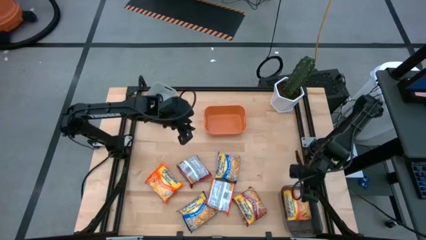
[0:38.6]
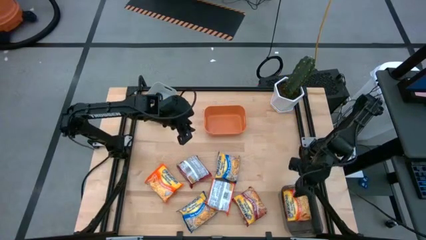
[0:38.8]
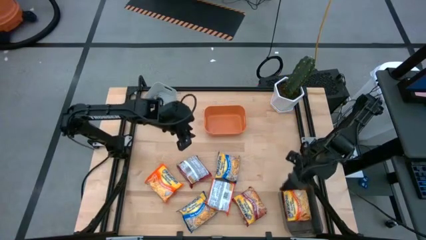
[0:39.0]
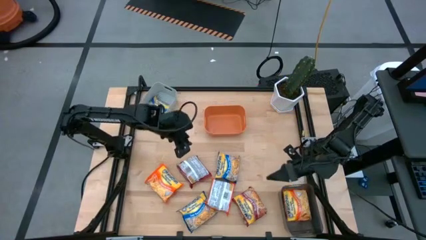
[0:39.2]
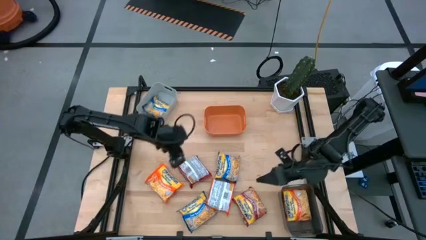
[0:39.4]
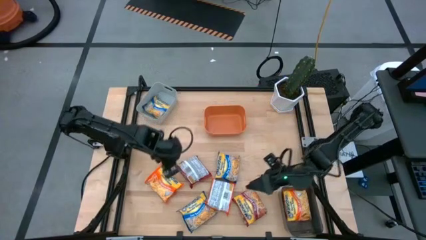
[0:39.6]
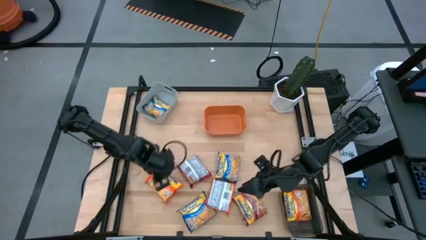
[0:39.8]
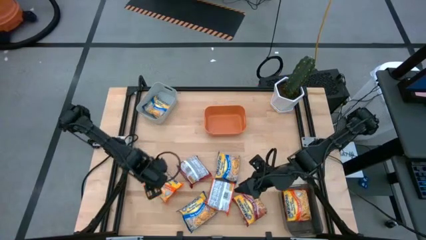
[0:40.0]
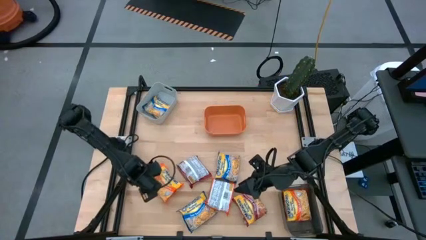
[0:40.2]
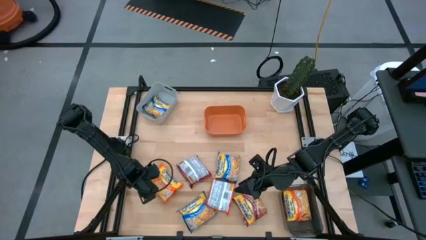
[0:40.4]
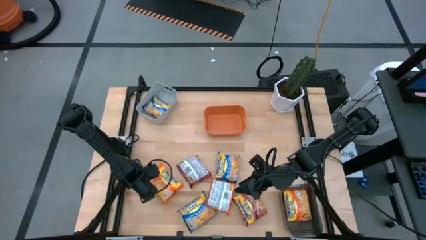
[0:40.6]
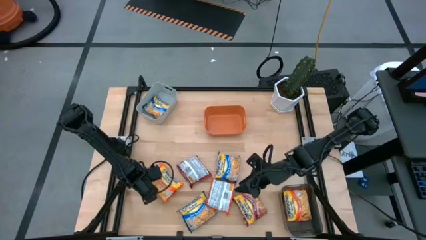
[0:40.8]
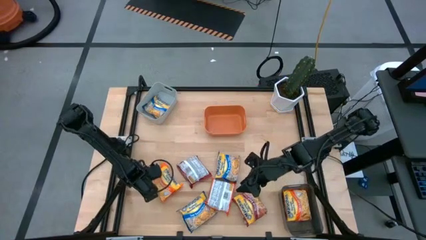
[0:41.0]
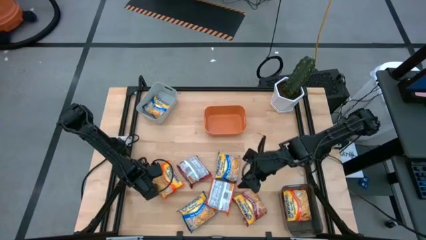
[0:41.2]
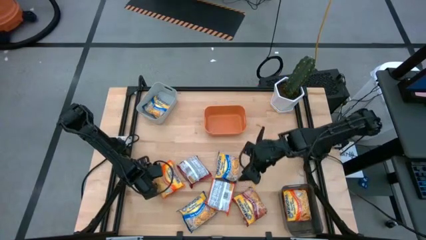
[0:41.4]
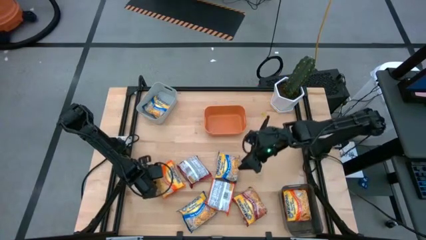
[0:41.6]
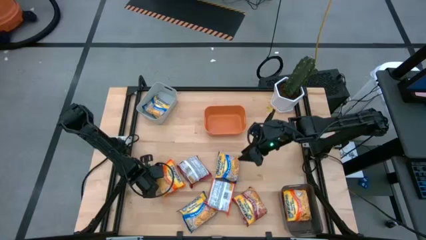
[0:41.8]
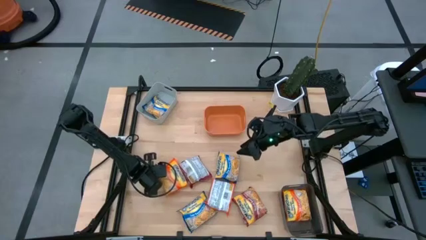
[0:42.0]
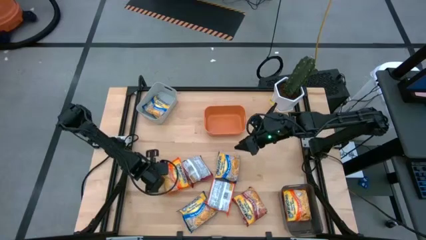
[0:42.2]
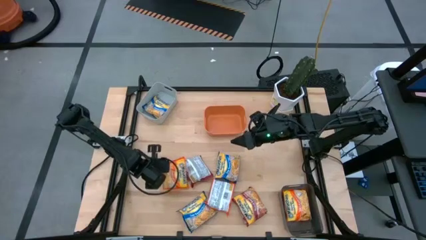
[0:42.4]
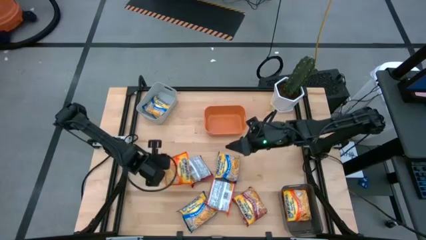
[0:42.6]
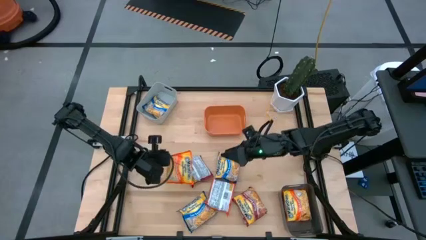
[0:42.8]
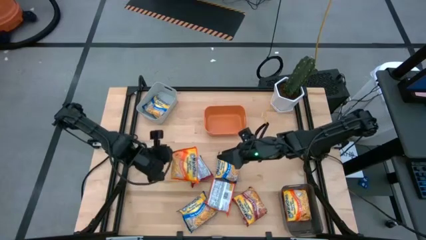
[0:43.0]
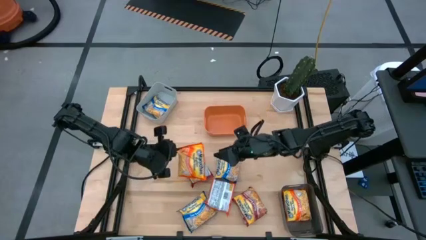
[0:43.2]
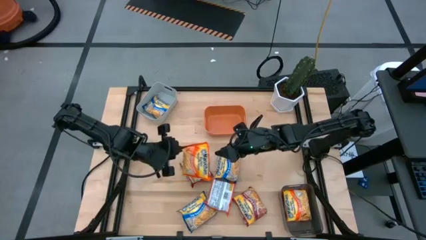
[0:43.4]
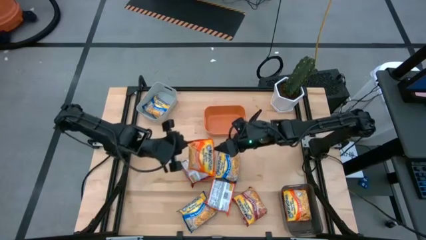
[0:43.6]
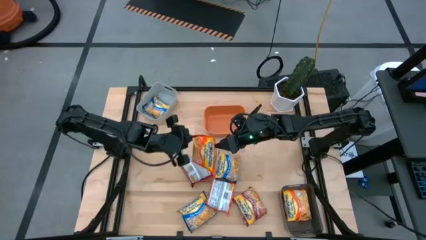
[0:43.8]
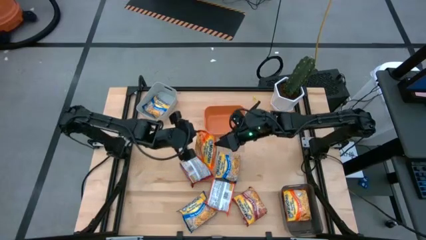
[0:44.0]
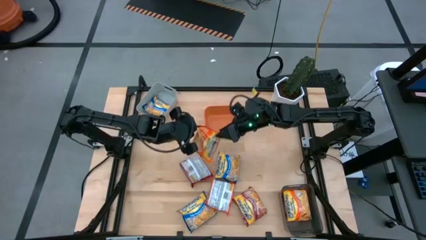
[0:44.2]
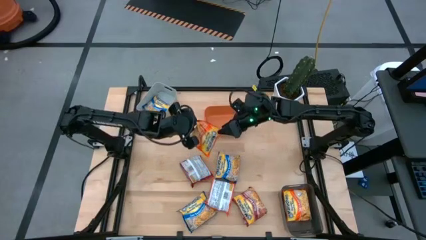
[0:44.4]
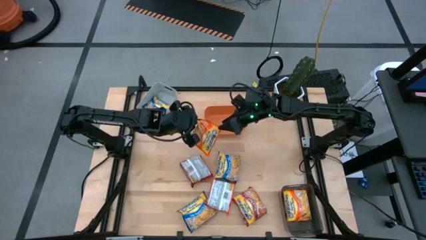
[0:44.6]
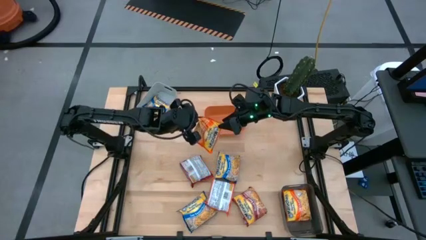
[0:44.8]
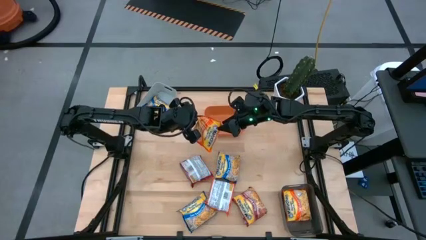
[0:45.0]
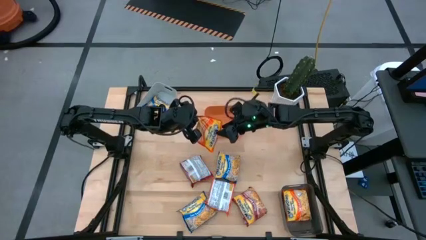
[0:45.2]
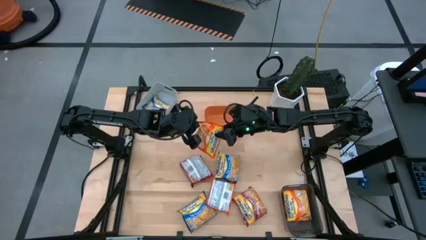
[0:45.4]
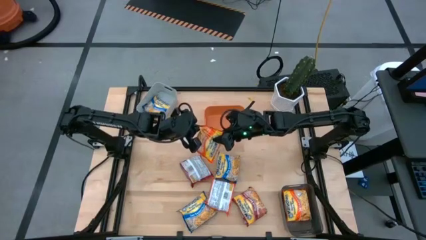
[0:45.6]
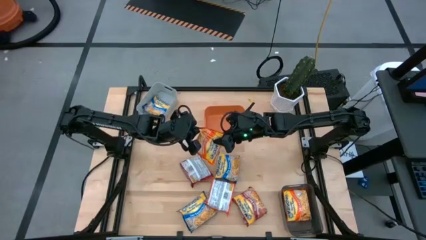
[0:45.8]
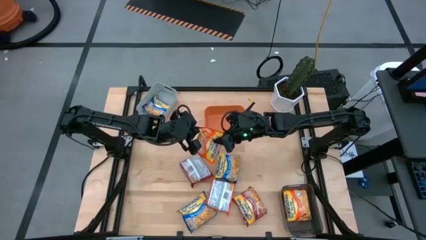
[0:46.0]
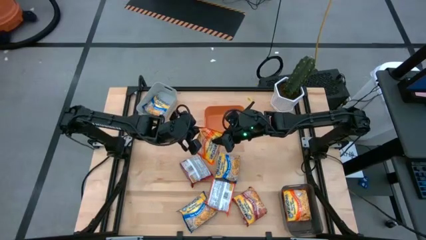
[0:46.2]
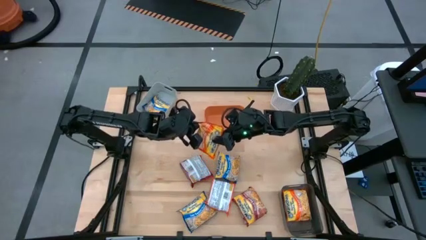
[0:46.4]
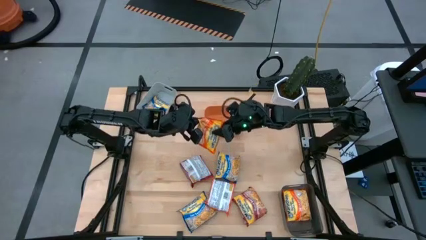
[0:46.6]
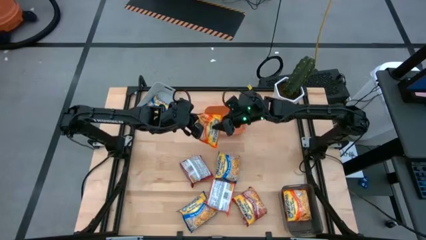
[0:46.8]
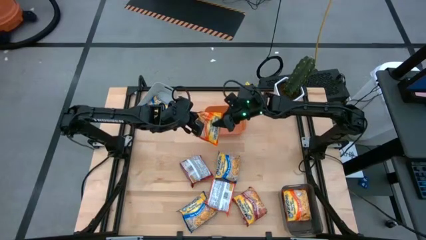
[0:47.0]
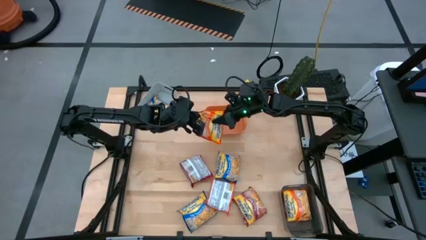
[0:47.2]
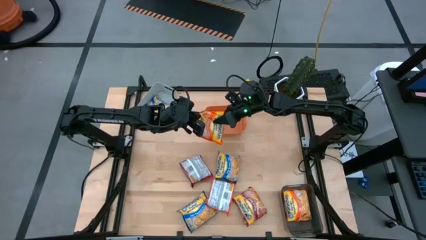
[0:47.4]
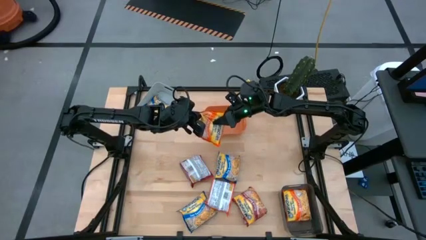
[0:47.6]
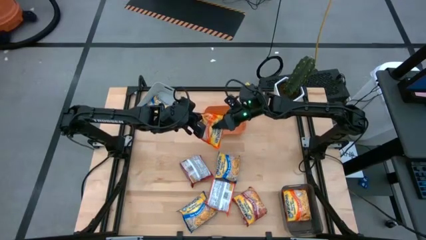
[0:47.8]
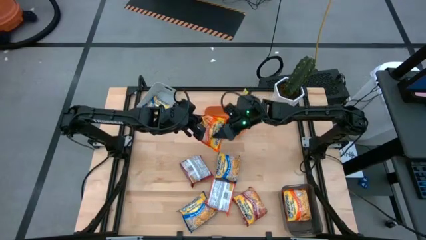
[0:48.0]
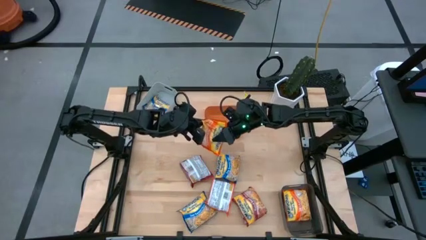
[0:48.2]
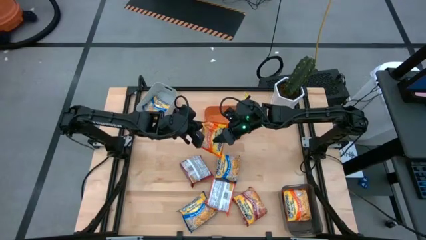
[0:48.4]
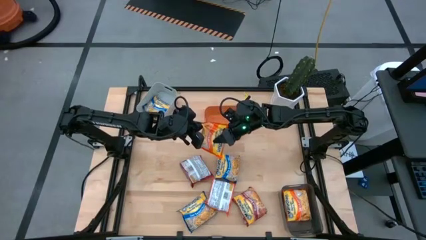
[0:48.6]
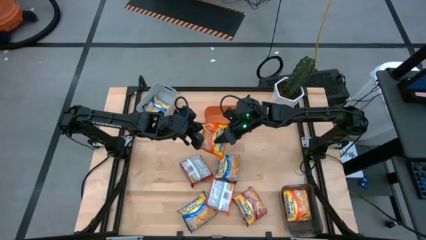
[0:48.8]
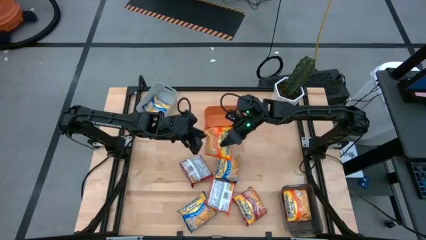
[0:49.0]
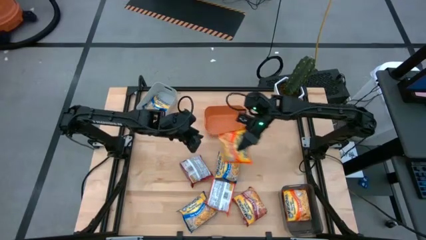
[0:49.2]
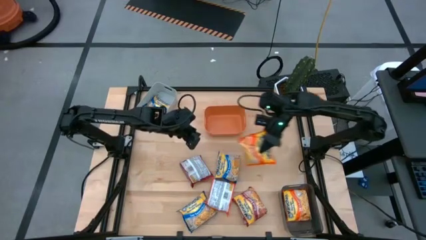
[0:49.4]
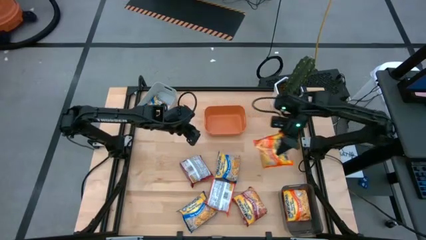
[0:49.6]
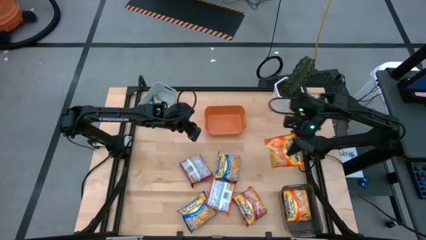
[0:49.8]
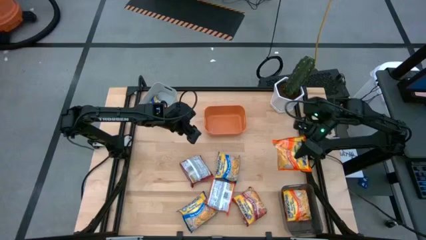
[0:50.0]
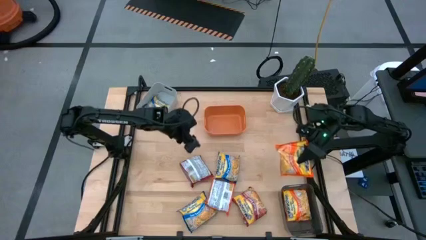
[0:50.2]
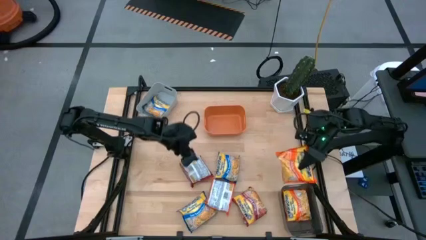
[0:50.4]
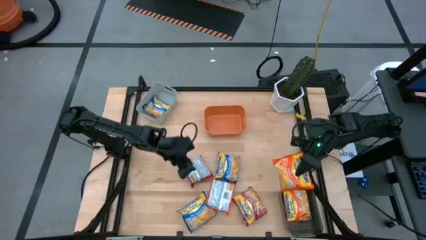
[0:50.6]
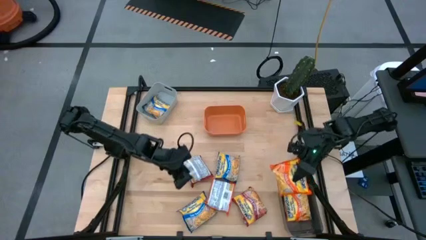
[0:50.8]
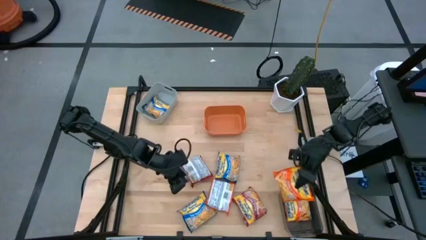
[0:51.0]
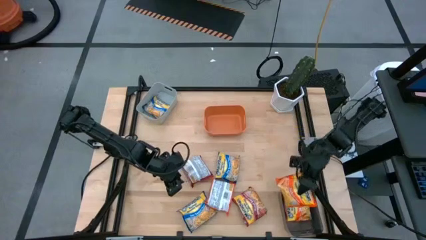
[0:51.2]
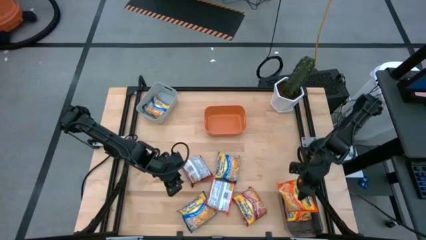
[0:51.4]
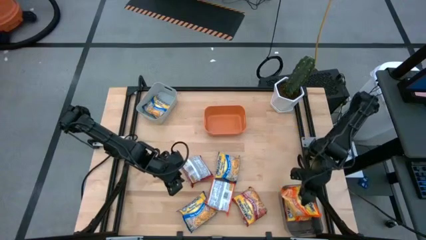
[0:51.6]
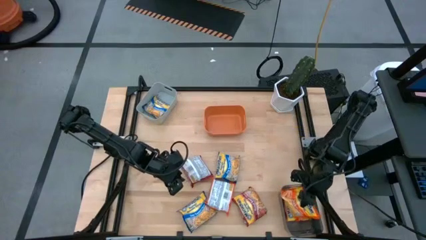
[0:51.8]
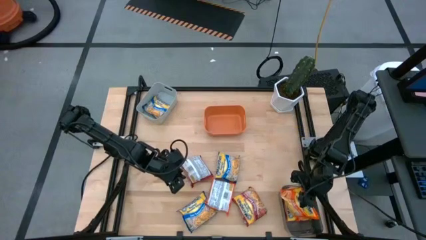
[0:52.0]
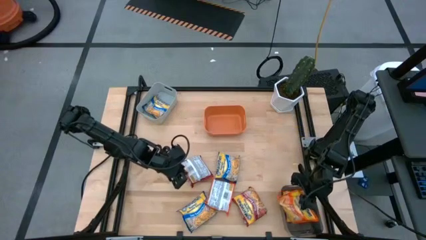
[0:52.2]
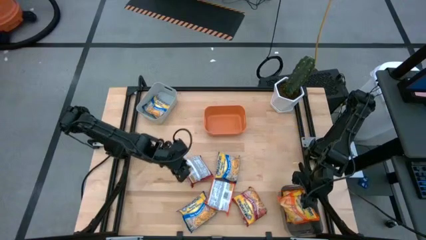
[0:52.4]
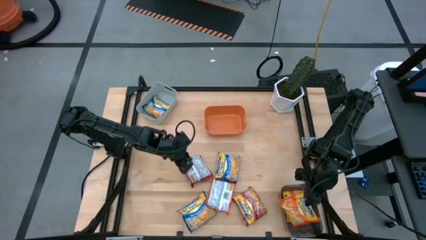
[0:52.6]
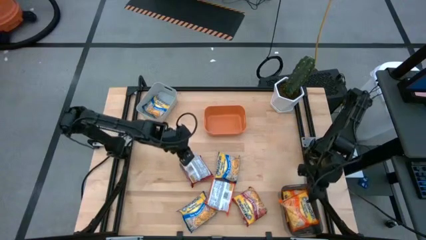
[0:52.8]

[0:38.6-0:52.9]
Task: Sort Maruchan noodles
Put the left orange noodle pack into the black bin
